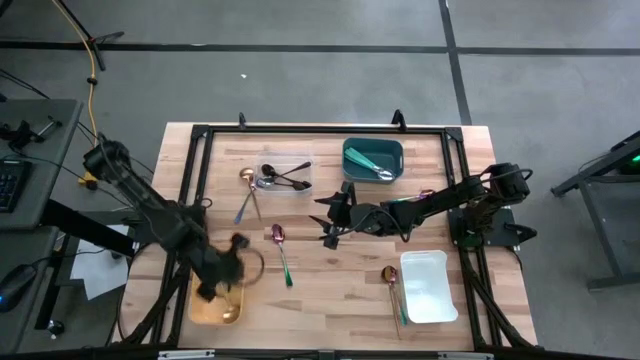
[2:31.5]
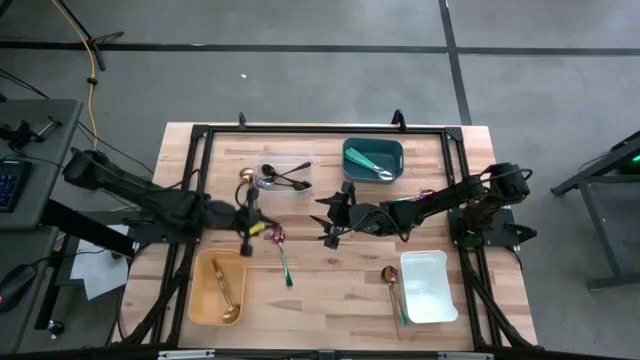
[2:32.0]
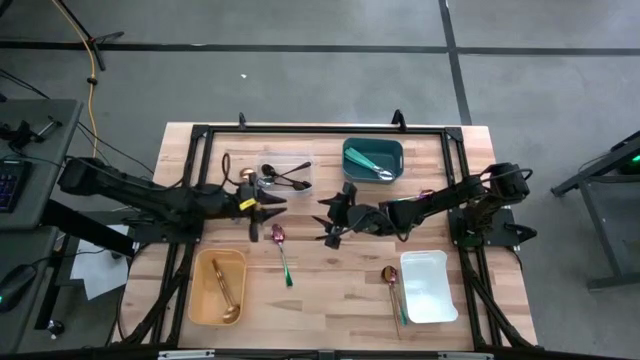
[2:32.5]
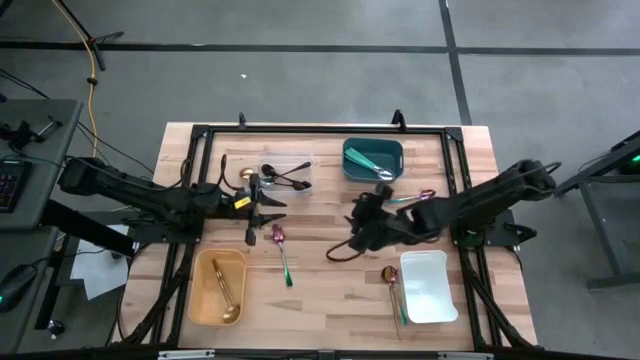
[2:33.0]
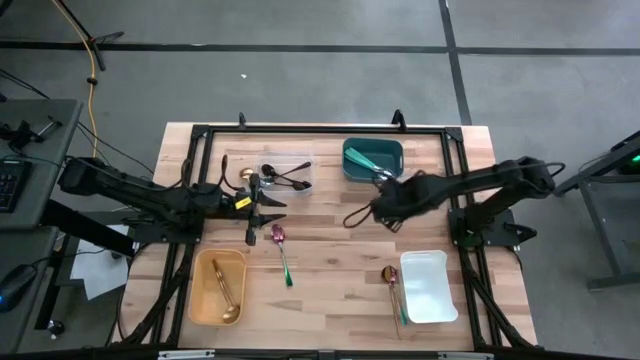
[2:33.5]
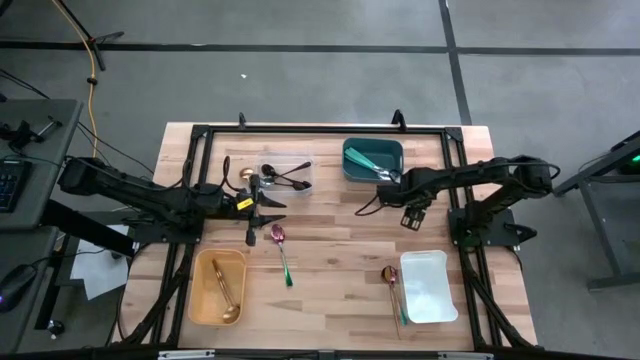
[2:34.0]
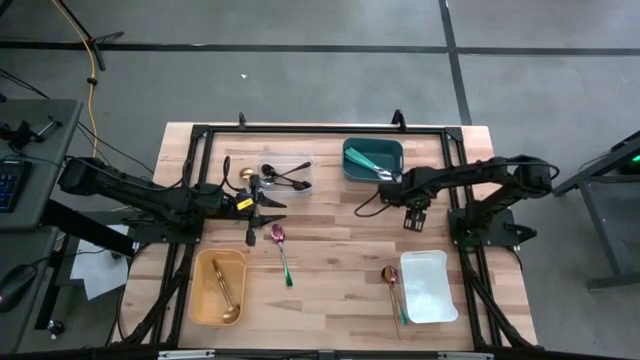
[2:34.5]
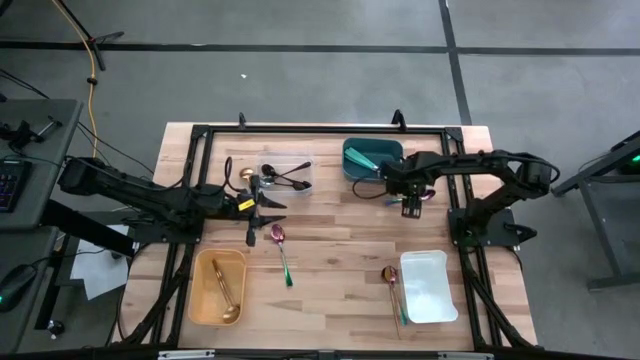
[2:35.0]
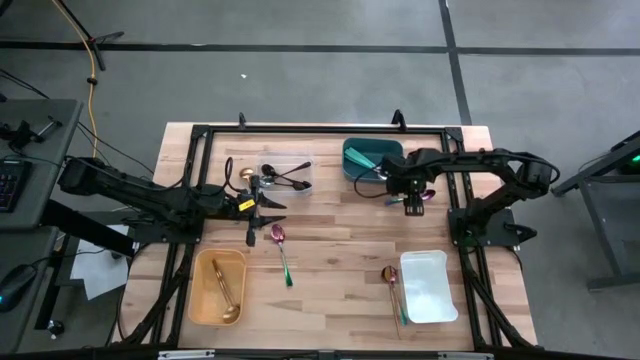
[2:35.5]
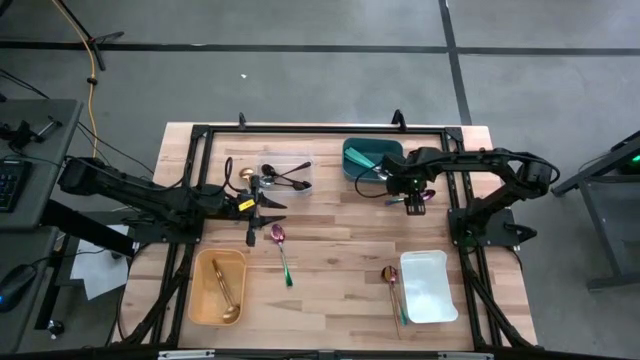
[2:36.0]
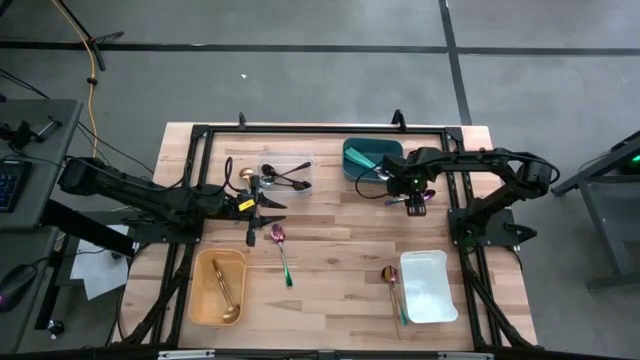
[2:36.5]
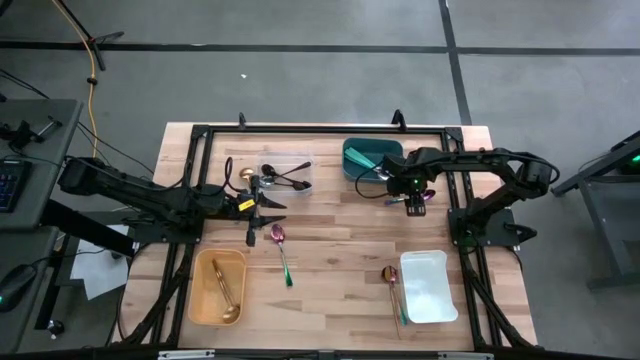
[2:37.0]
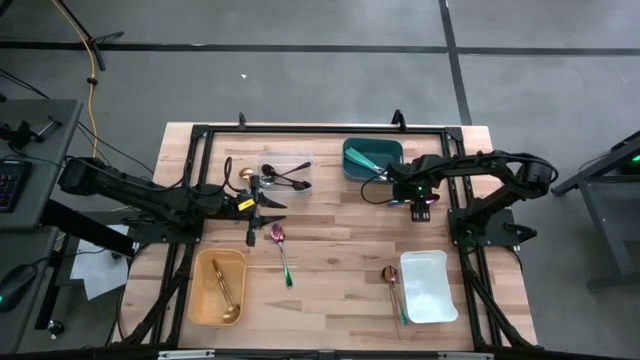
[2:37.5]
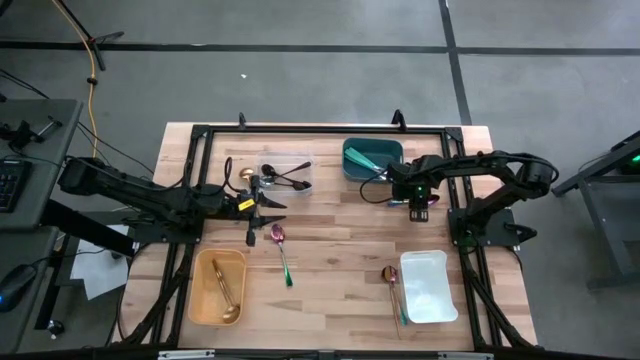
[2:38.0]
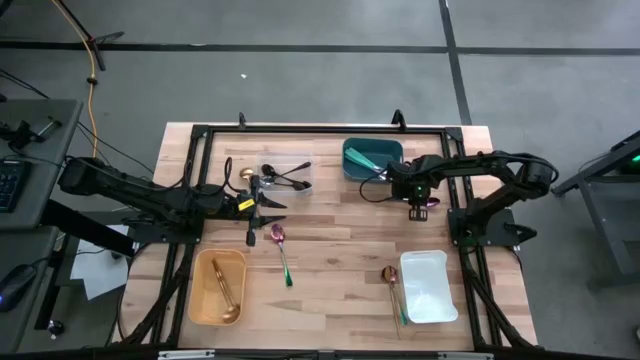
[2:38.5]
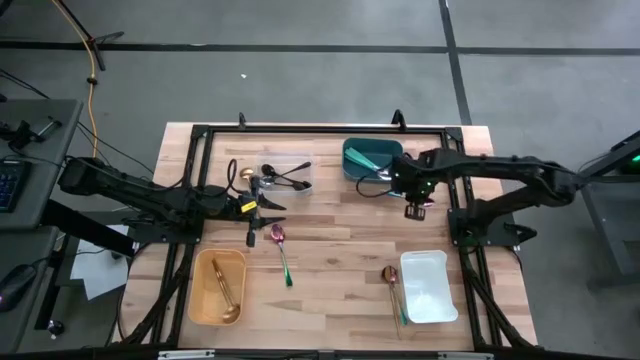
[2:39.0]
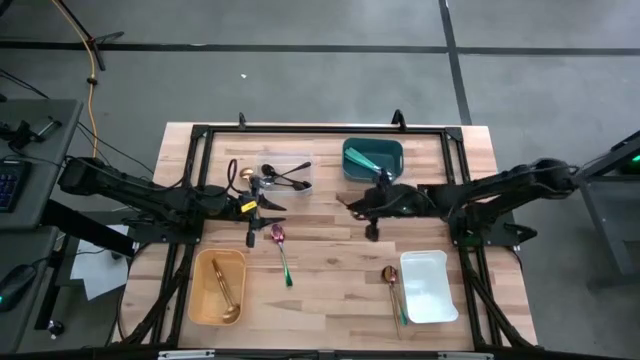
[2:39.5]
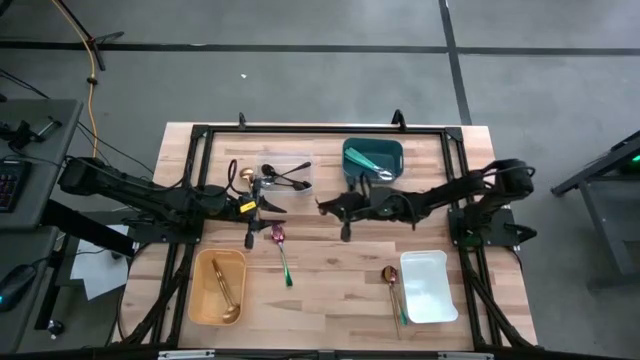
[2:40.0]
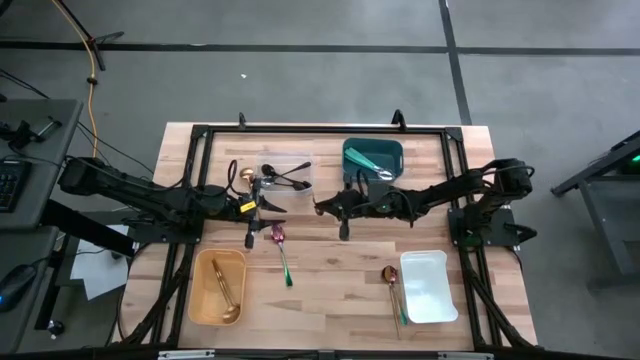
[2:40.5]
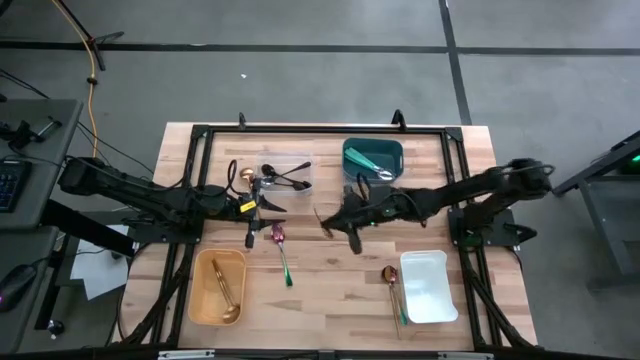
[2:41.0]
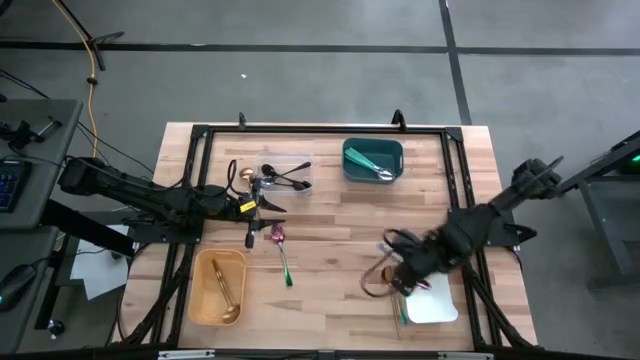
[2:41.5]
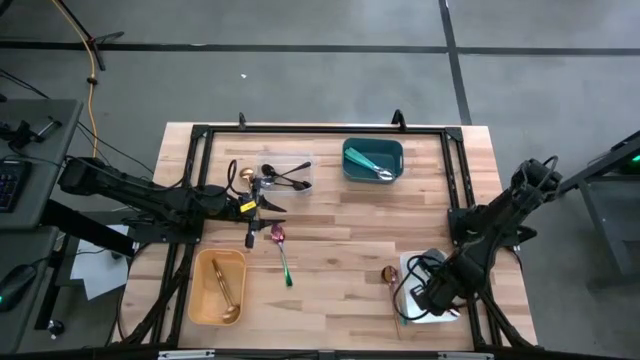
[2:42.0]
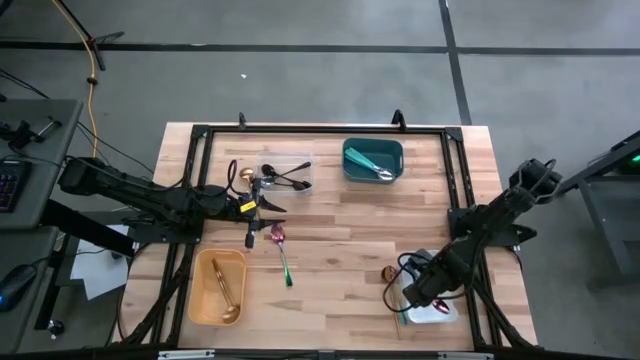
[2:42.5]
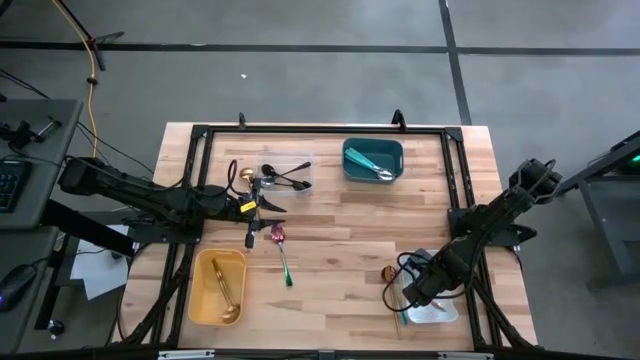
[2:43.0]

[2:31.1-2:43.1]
Task: Sort silverware by color (type)
Put the purple spoon into the white bin

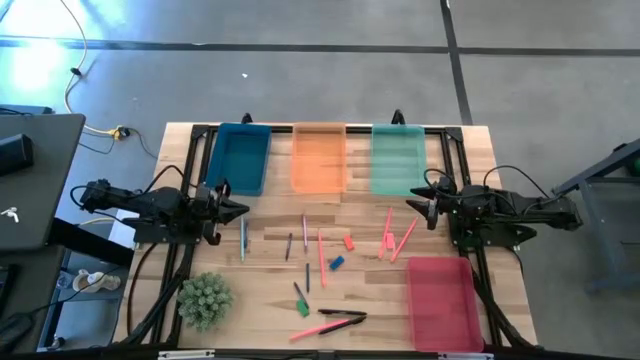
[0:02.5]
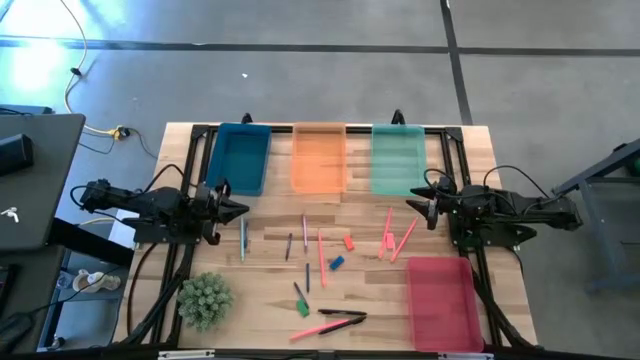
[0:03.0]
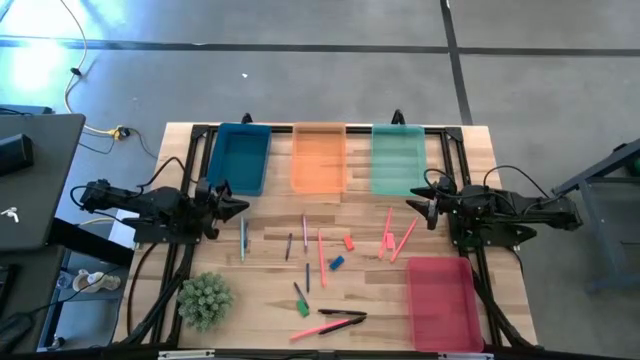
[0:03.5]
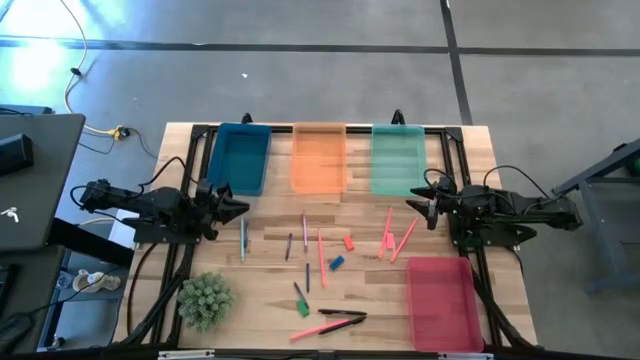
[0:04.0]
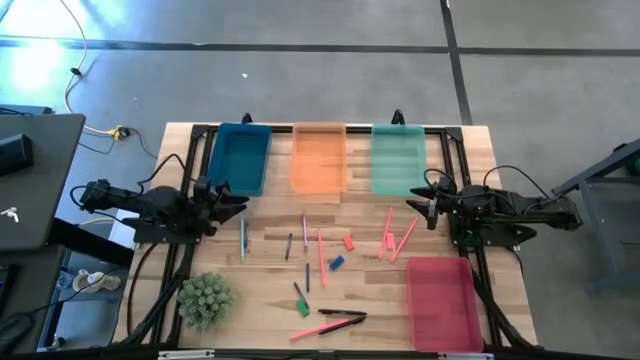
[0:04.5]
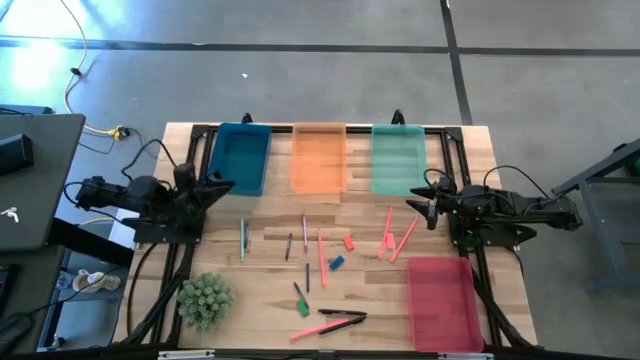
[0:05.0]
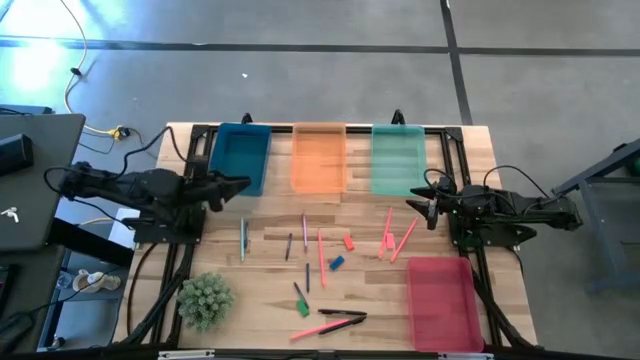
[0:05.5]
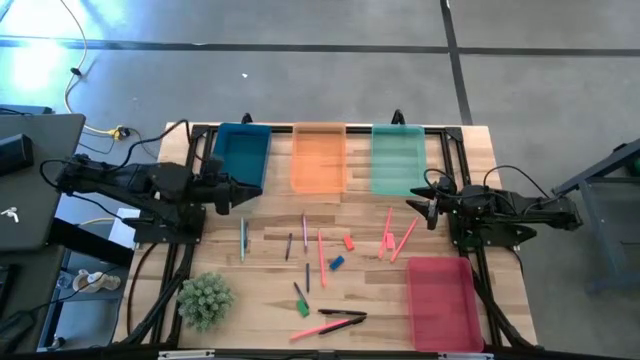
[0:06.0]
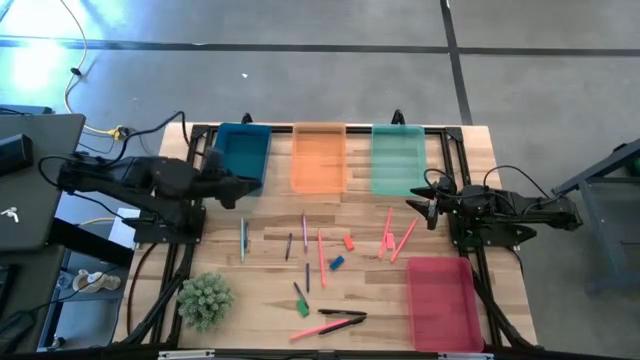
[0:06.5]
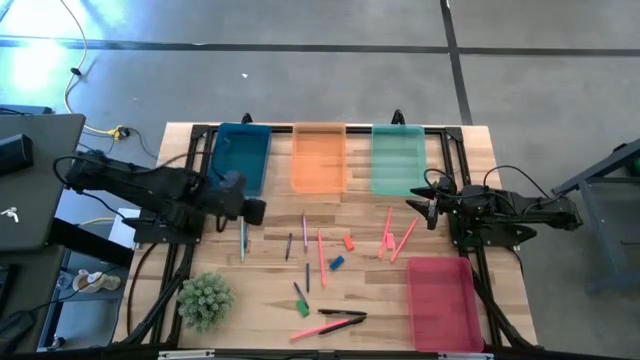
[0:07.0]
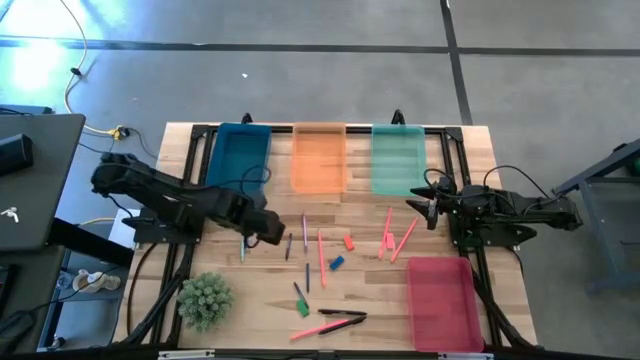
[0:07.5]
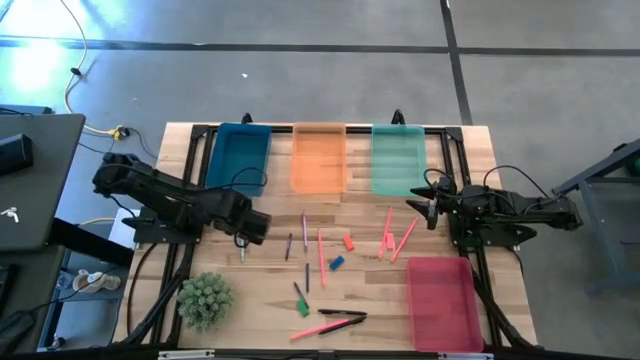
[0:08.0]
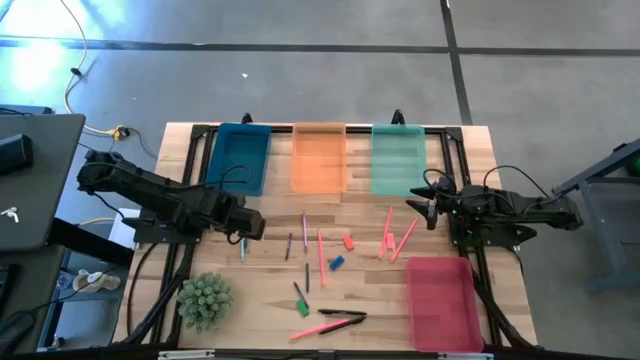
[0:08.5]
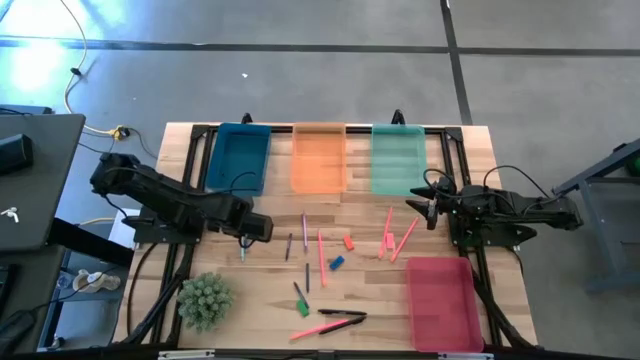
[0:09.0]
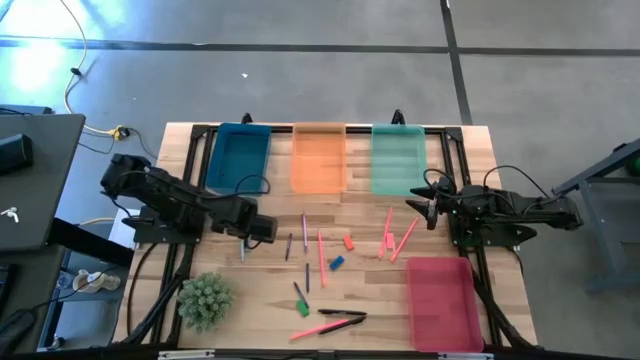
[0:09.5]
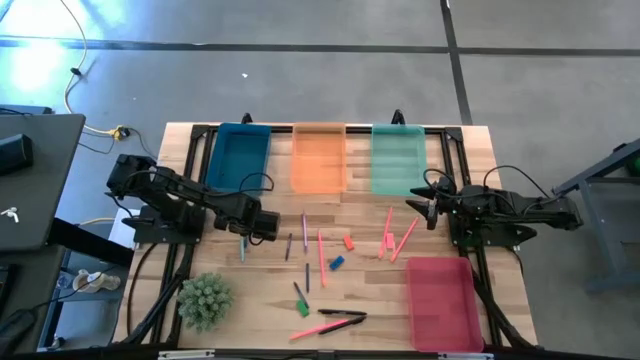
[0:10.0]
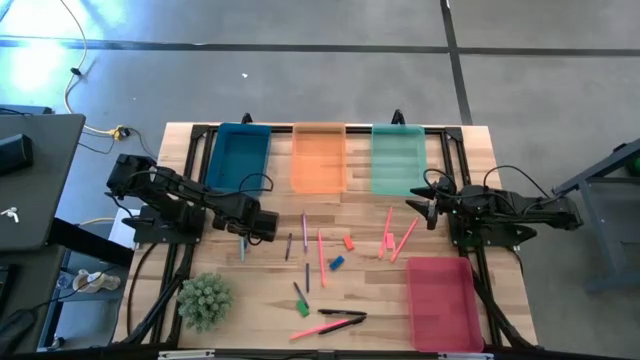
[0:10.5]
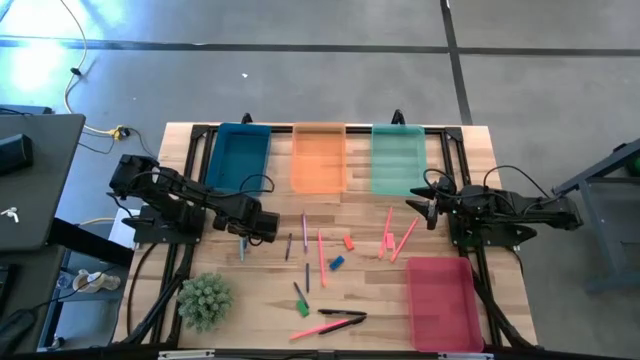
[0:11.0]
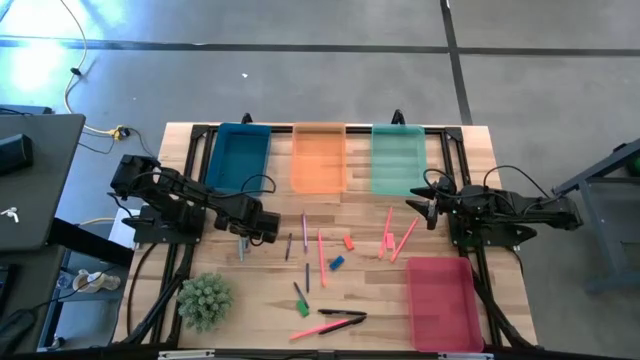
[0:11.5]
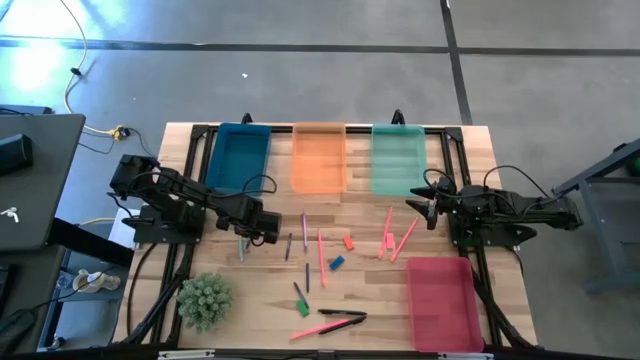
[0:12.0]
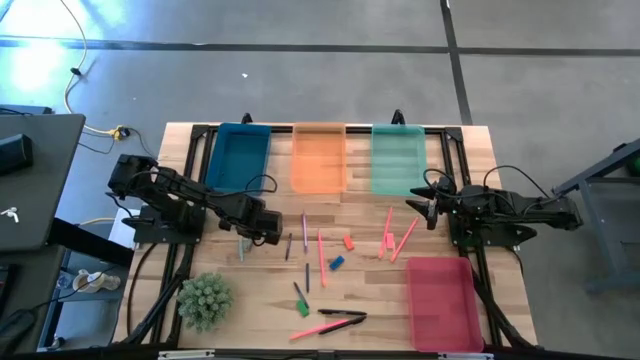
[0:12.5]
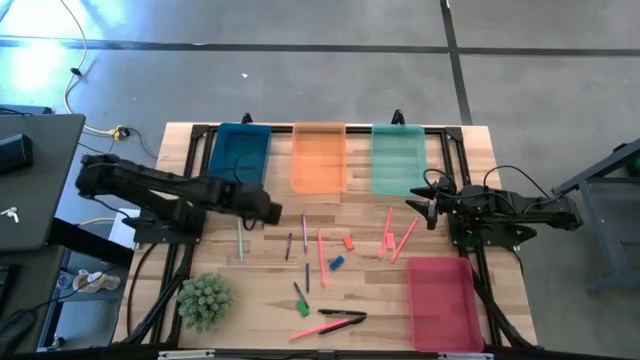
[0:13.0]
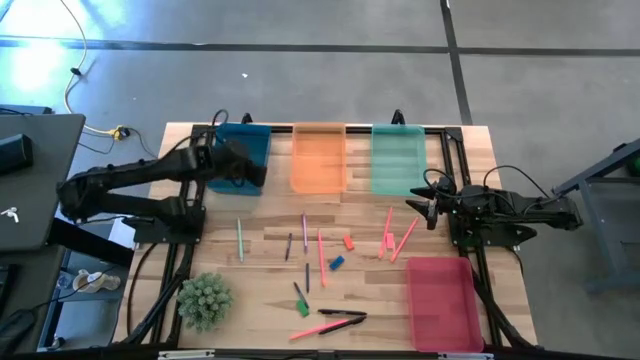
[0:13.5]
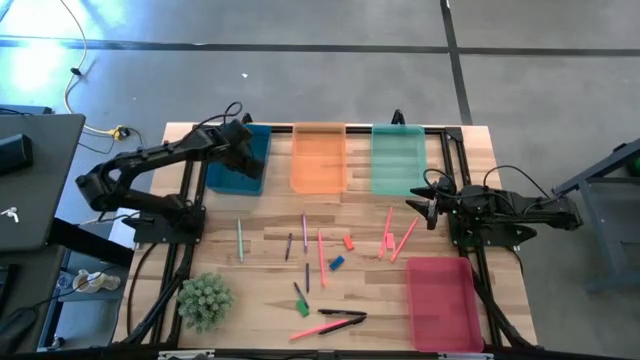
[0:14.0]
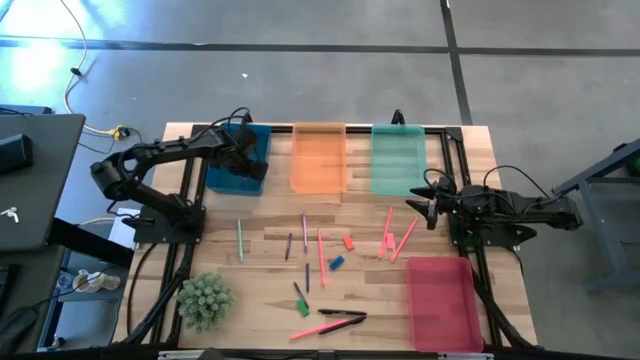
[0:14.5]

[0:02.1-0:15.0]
Task: Sort crayons/erasers/pens/pencils in bins
Put the top left blue crayon into the blue bin
